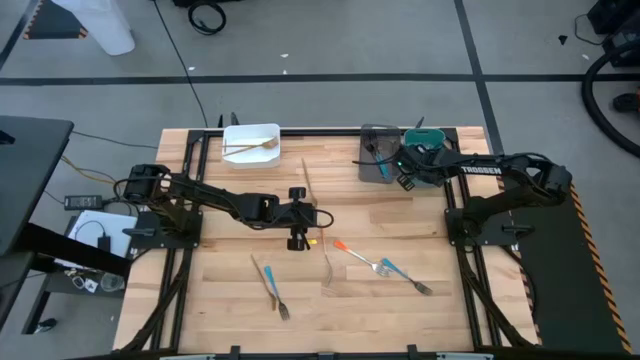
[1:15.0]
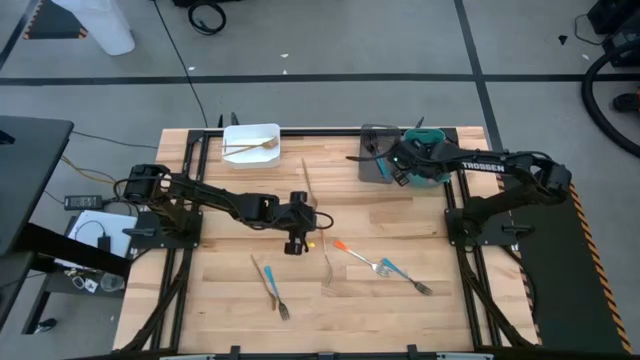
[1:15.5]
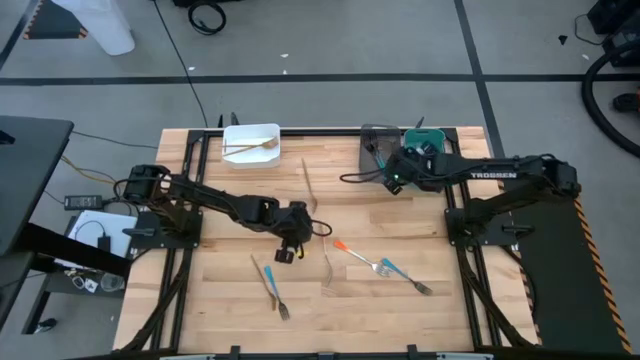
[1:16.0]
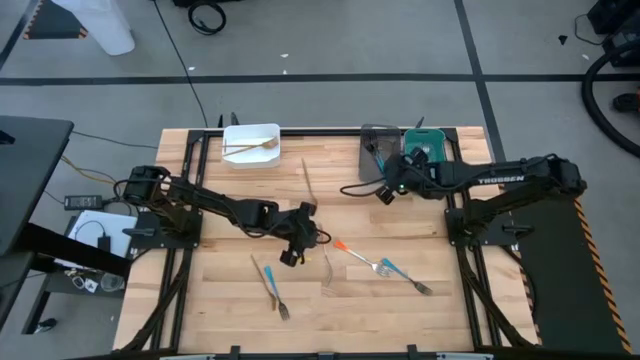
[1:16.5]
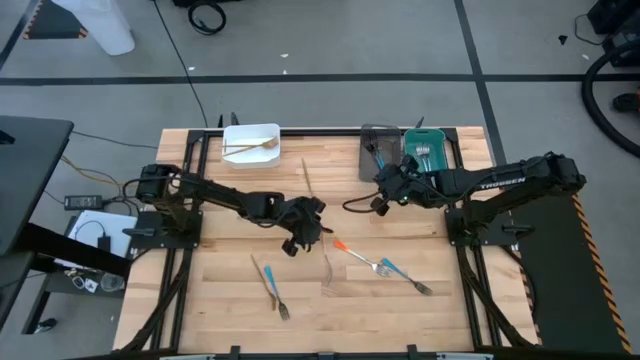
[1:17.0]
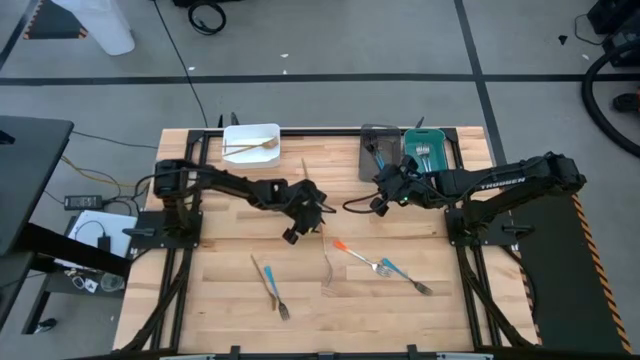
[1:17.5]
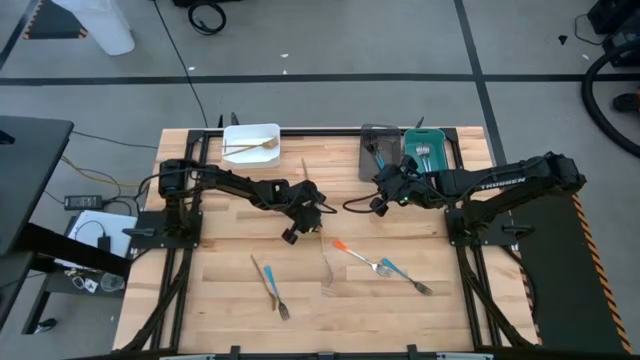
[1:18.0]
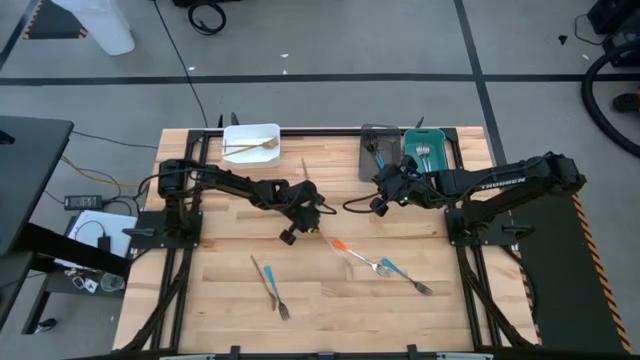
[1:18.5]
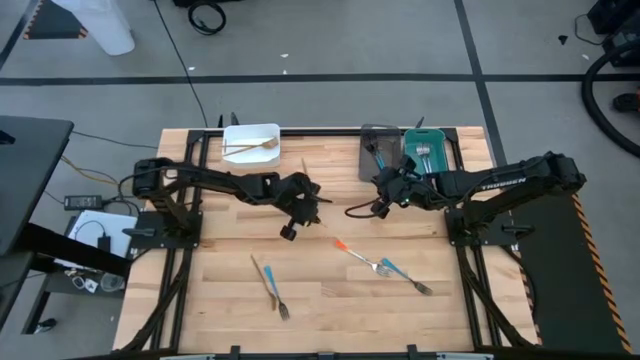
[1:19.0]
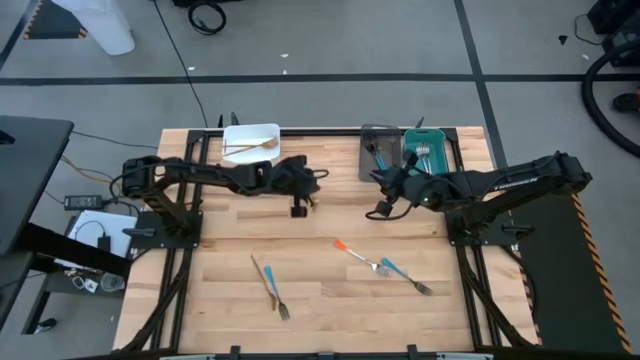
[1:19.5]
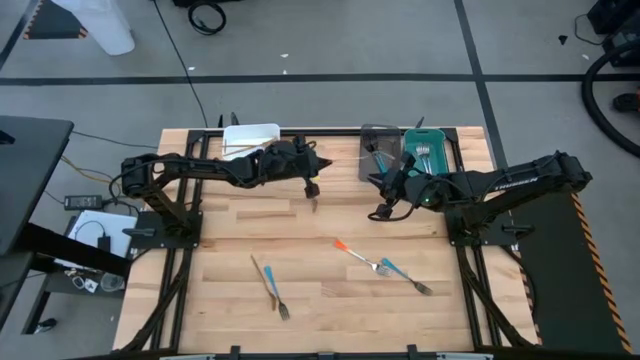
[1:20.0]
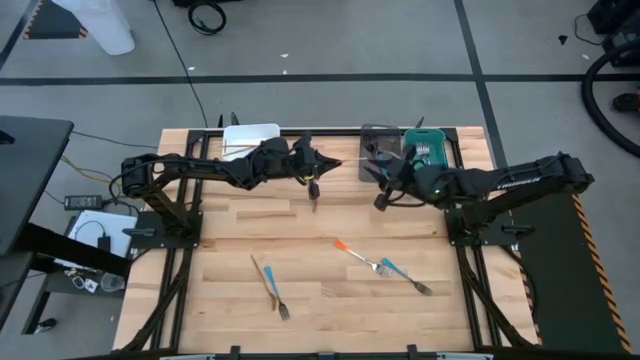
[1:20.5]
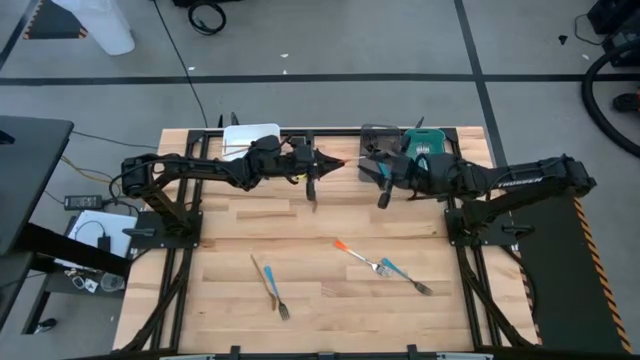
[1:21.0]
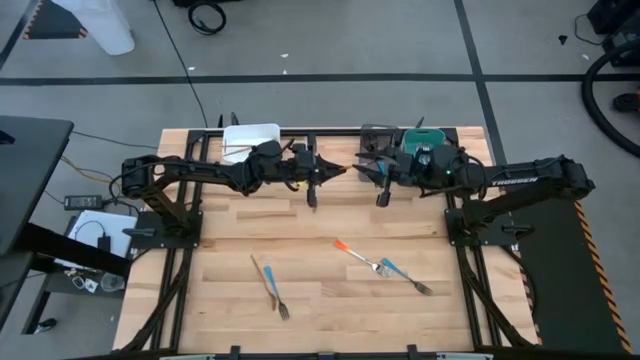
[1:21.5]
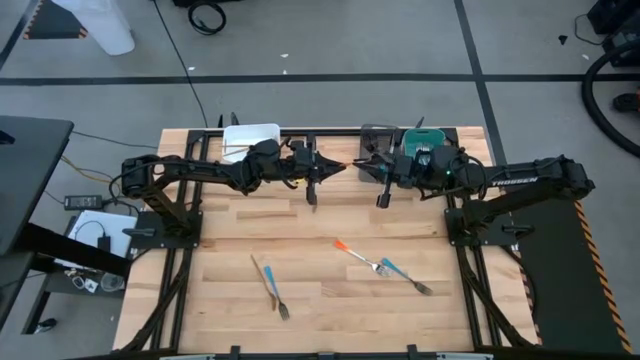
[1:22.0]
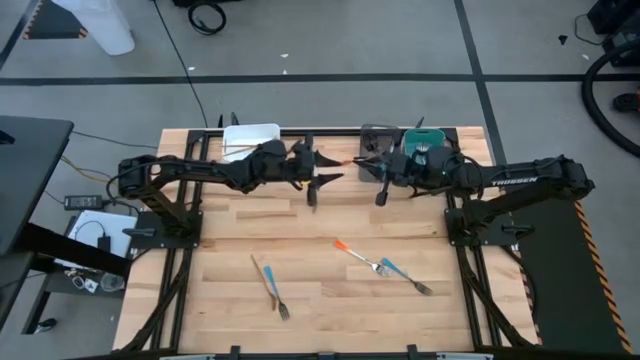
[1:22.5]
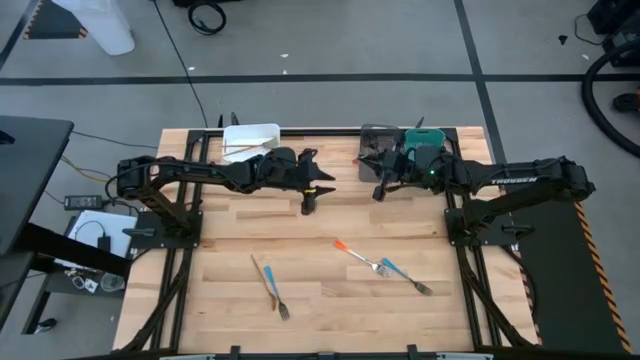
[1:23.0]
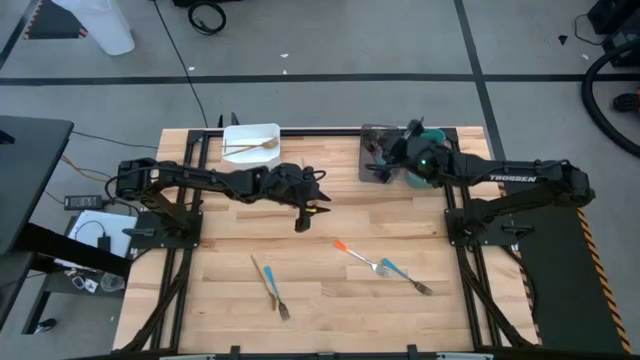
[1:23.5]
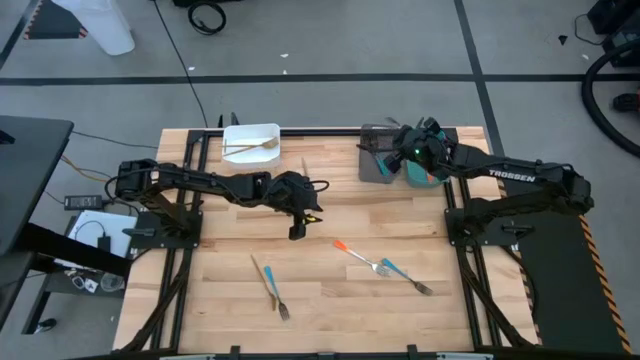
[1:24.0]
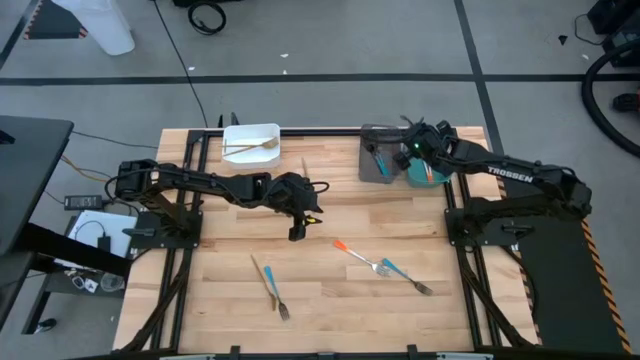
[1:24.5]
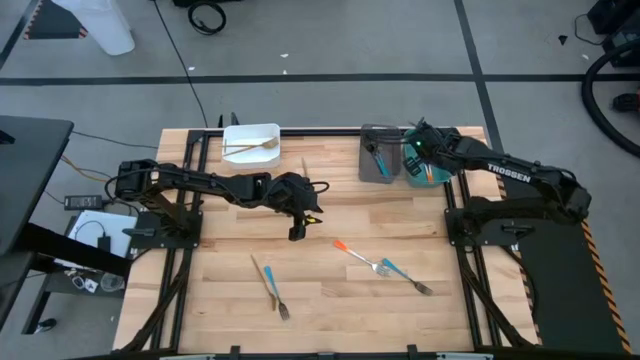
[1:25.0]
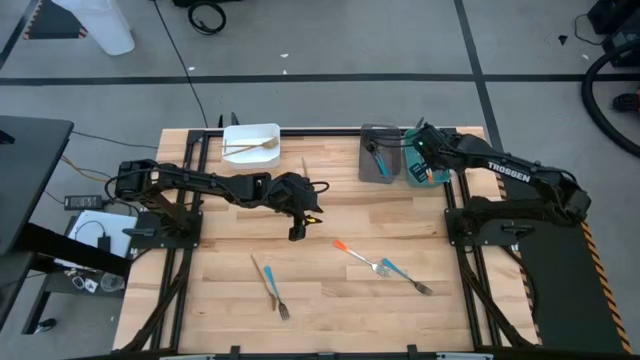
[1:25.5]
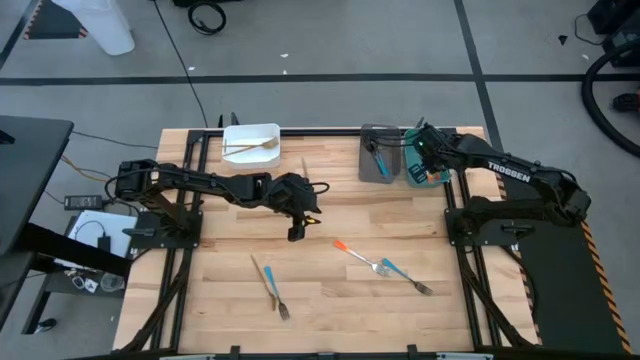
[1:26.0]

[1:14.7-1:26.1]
Task: Sort silverware by color (type)
Put the left orange fork into the green bin

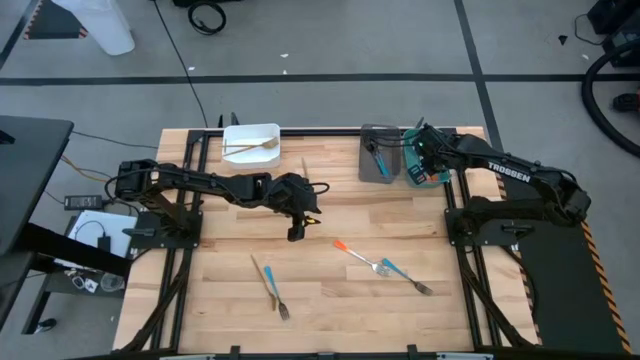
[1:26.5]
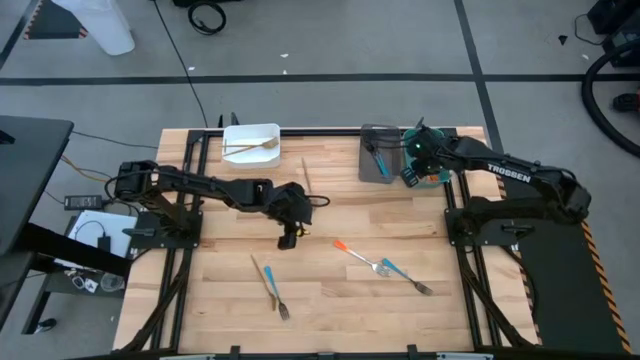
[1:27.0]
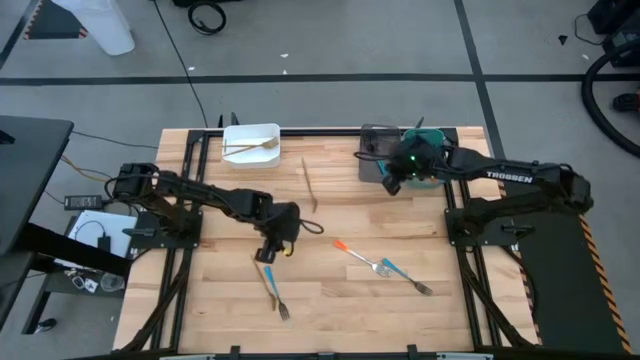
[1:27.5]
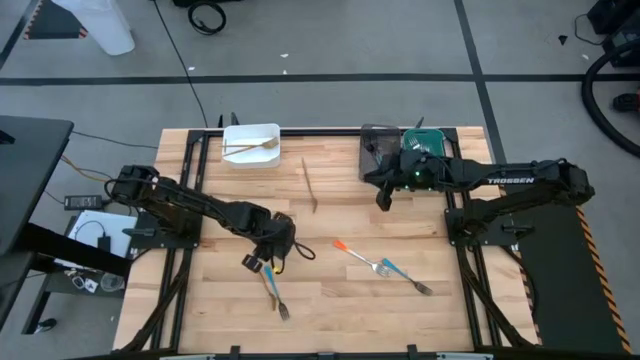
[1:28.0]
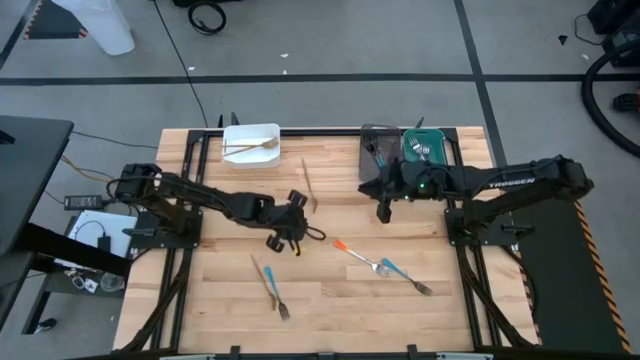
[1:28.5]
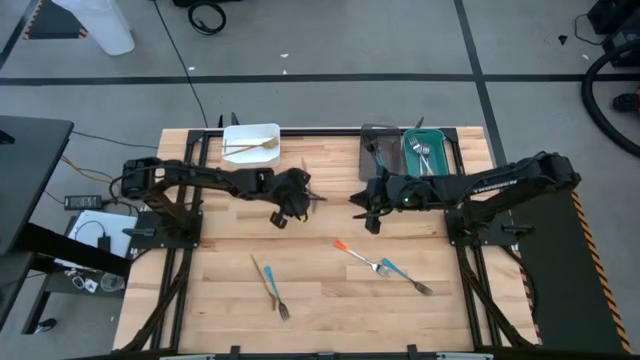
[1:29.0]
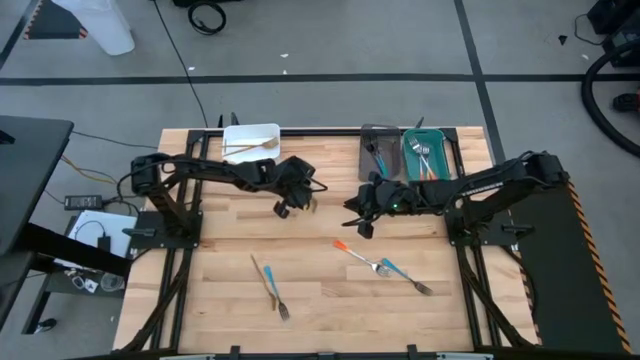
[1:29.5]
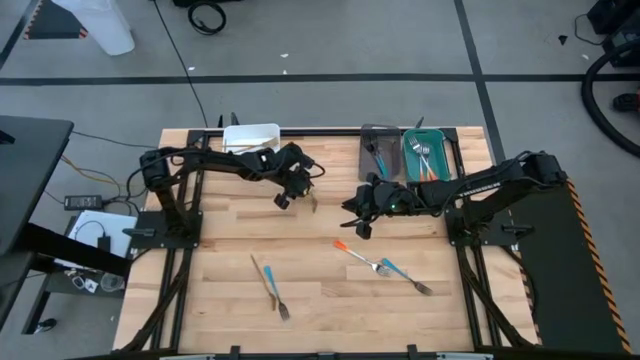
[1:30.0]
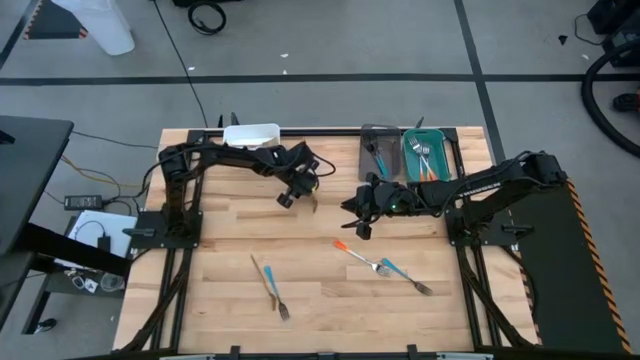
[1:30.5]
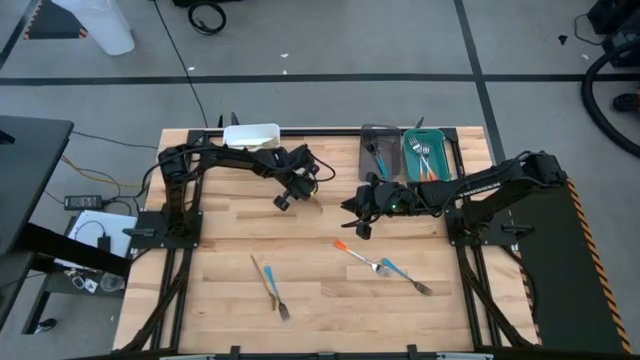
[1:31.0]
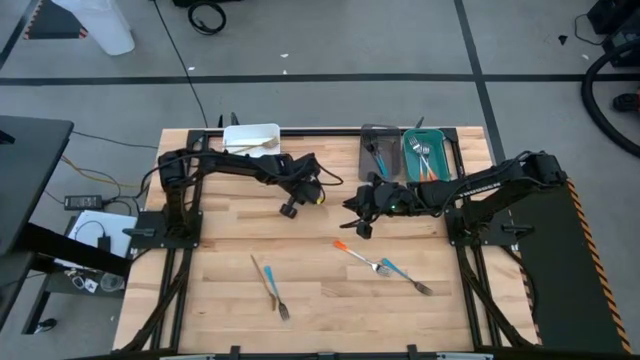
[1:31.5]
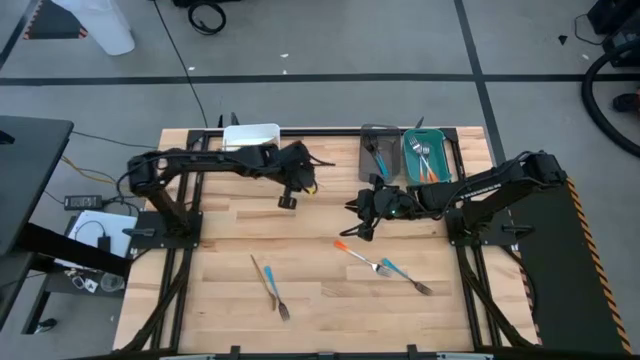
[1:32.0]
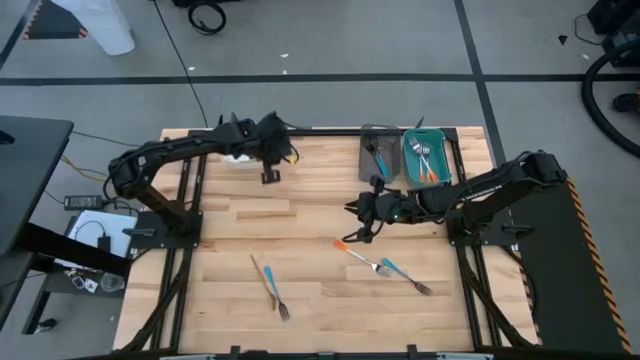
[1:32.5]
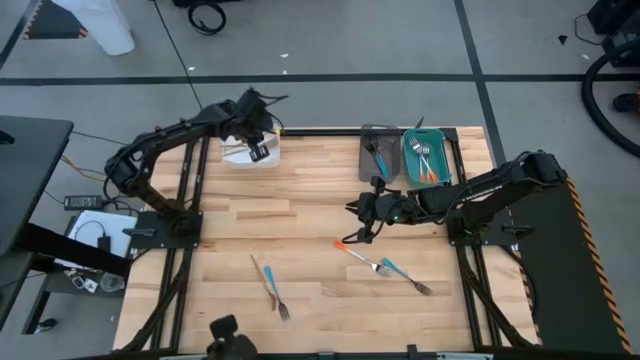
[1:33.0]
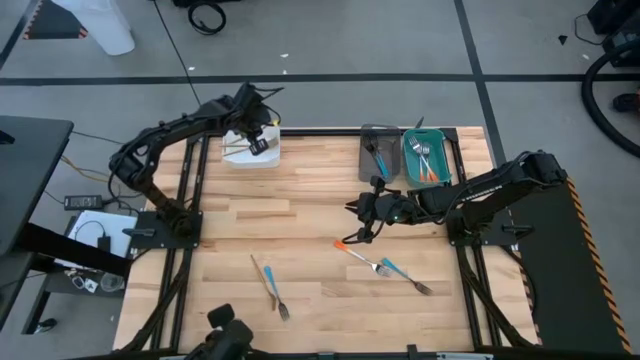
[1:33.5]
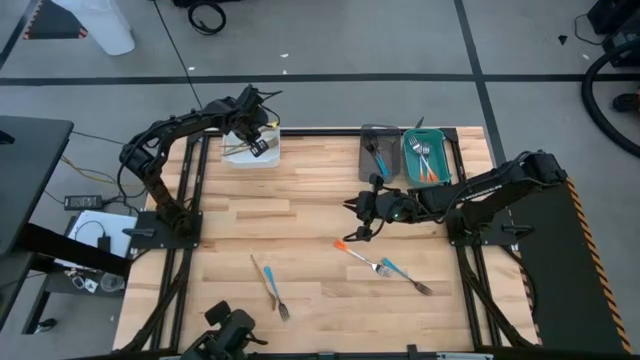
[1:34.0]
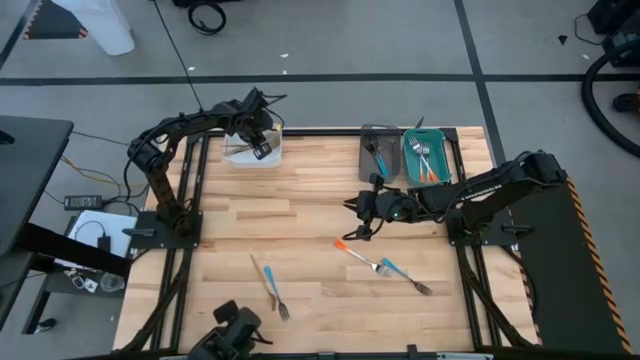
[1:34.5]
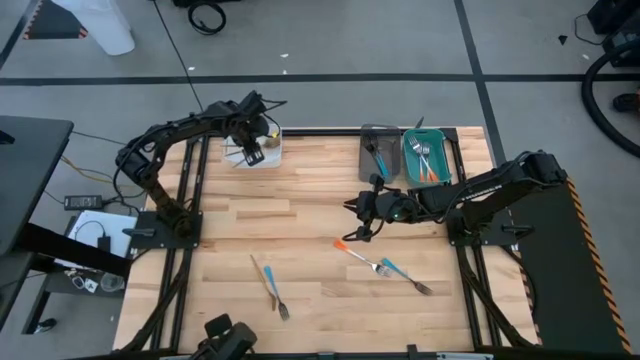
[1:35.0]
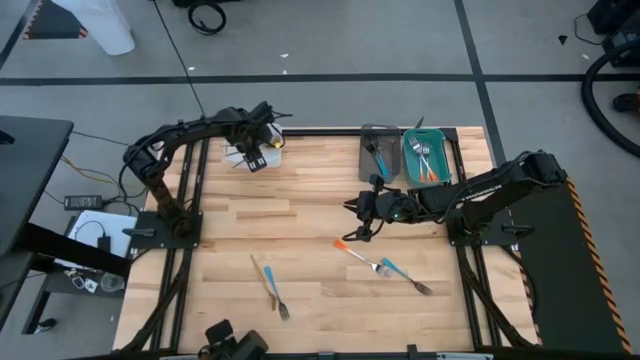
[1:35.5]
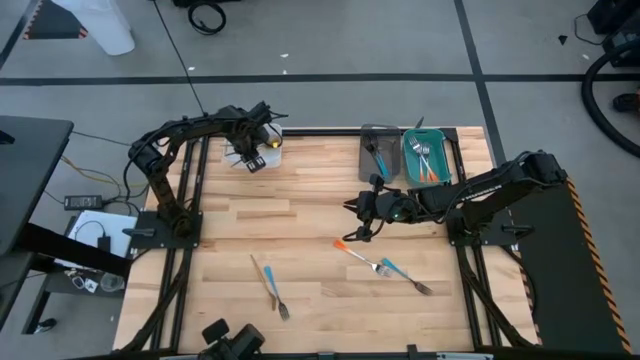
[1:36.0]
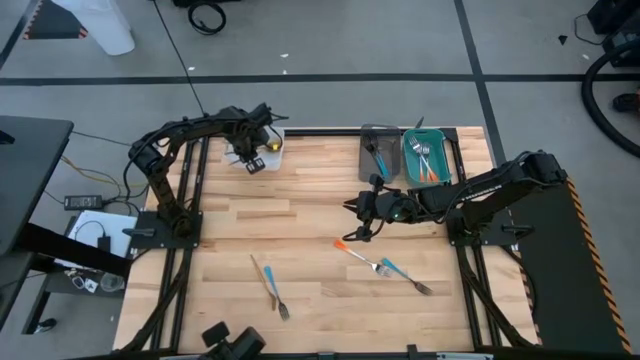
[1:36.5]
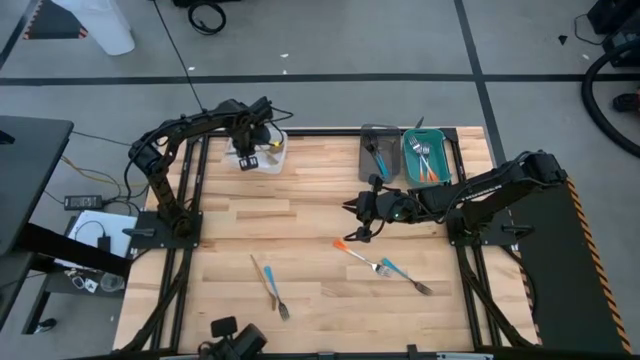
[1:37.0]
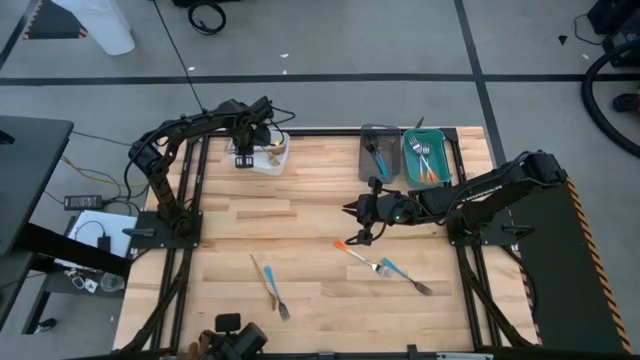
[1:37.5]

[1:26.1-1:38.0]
Put the top gold fork into the white bin
